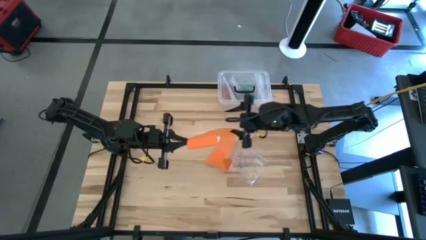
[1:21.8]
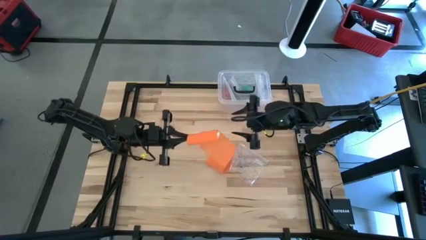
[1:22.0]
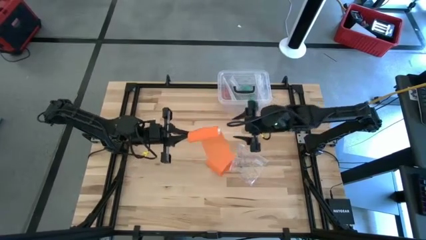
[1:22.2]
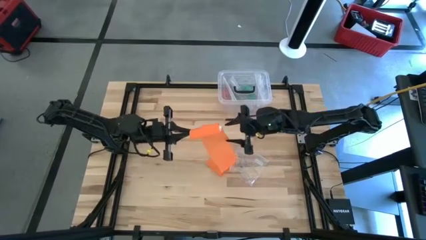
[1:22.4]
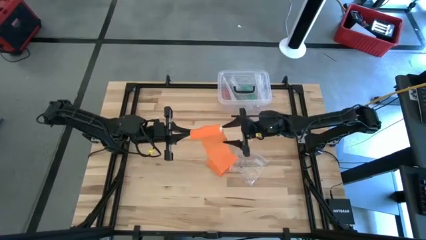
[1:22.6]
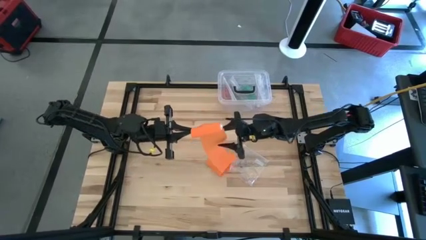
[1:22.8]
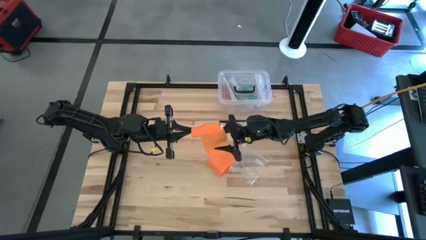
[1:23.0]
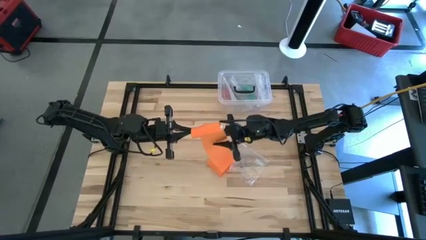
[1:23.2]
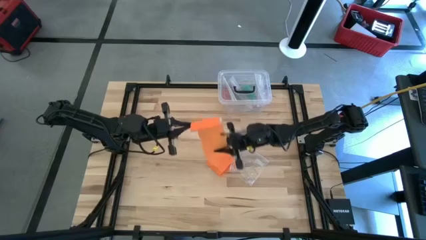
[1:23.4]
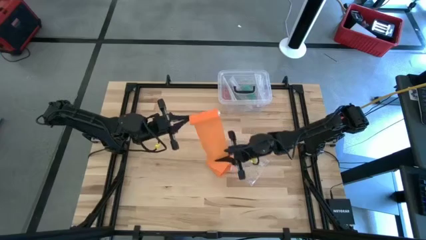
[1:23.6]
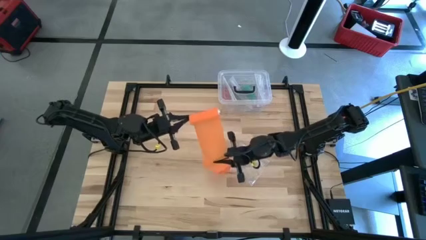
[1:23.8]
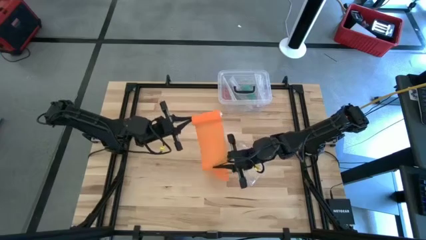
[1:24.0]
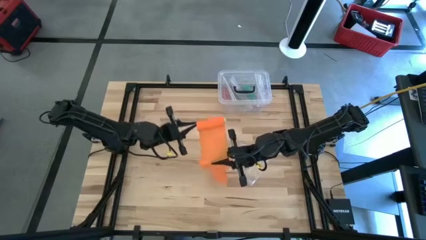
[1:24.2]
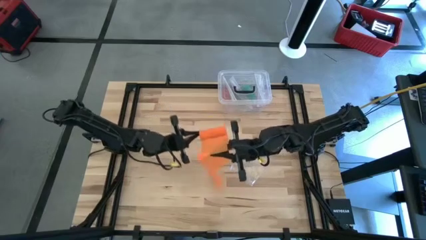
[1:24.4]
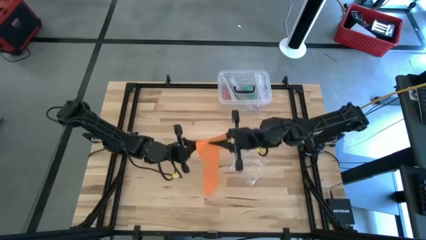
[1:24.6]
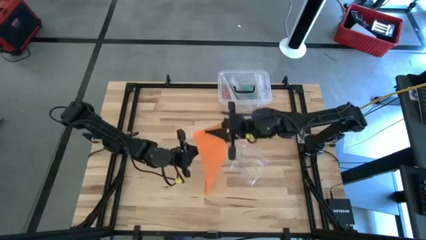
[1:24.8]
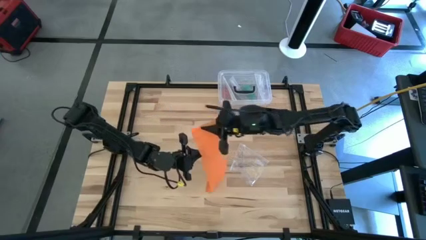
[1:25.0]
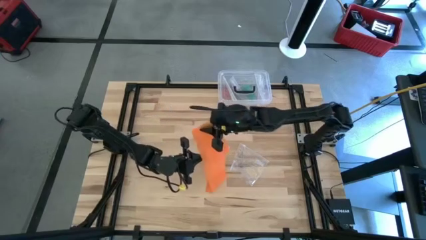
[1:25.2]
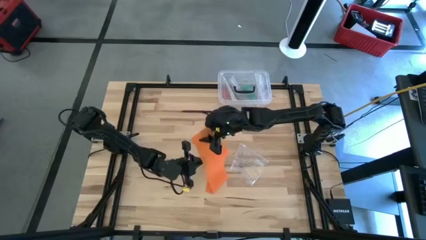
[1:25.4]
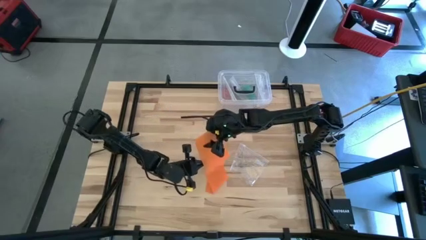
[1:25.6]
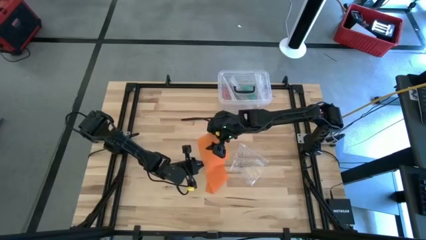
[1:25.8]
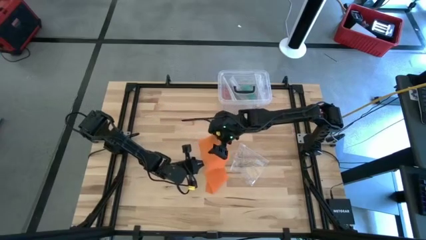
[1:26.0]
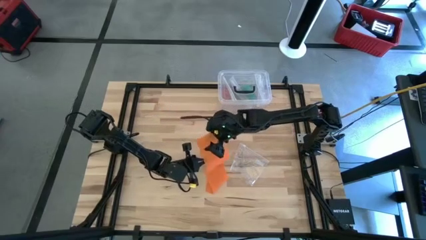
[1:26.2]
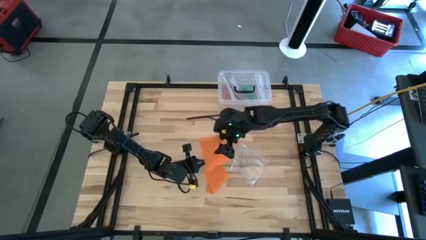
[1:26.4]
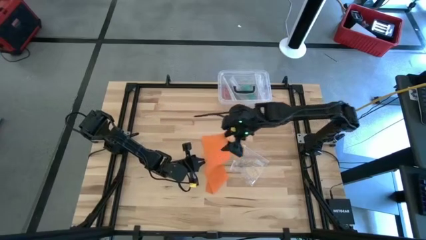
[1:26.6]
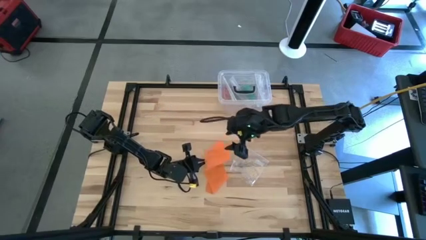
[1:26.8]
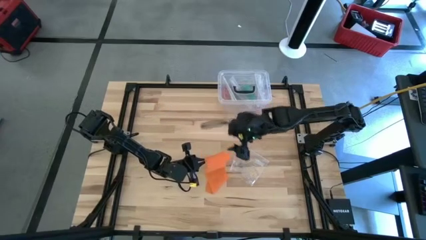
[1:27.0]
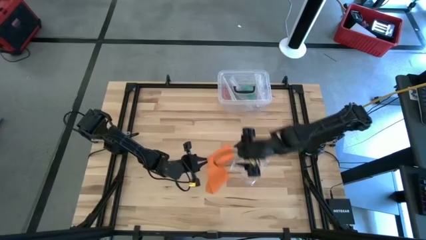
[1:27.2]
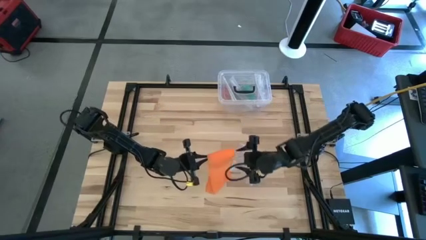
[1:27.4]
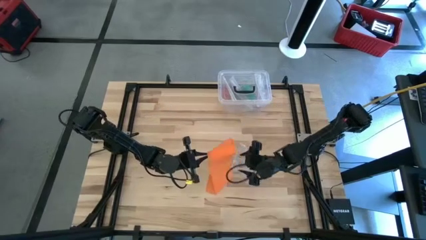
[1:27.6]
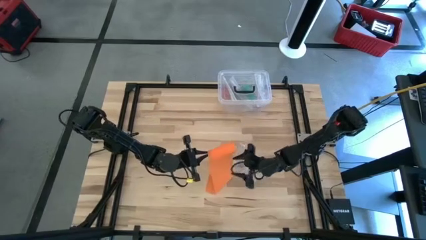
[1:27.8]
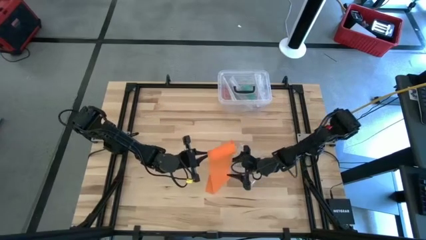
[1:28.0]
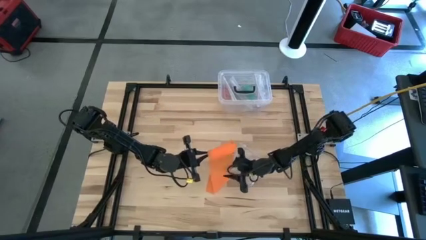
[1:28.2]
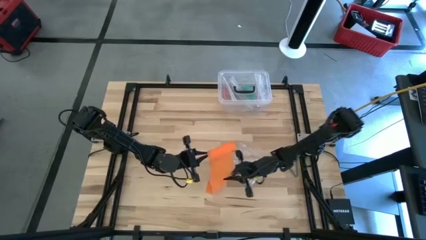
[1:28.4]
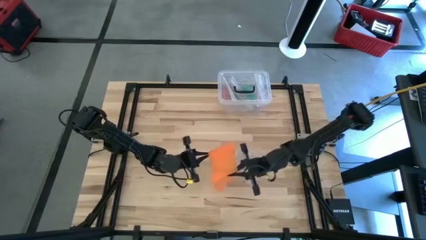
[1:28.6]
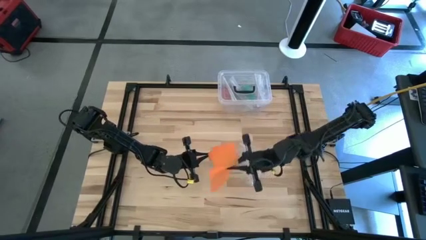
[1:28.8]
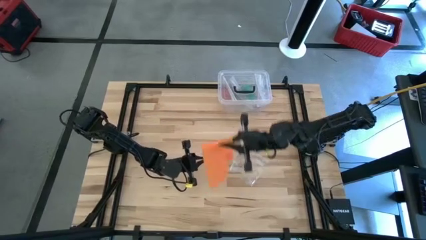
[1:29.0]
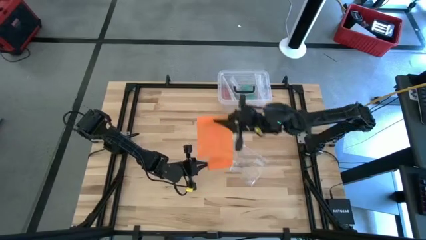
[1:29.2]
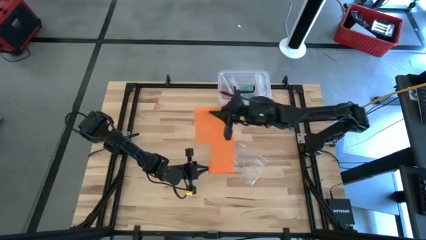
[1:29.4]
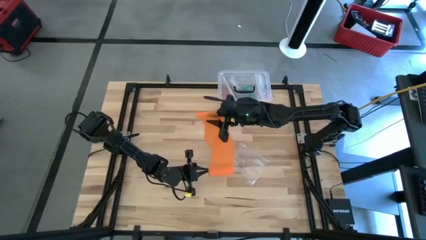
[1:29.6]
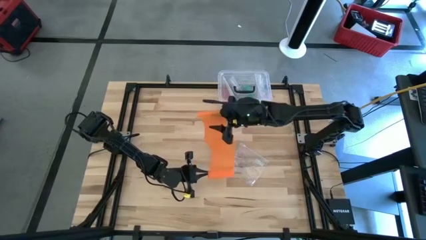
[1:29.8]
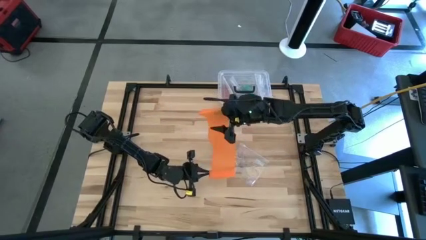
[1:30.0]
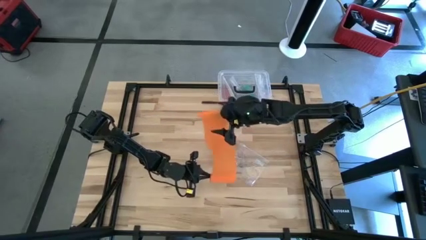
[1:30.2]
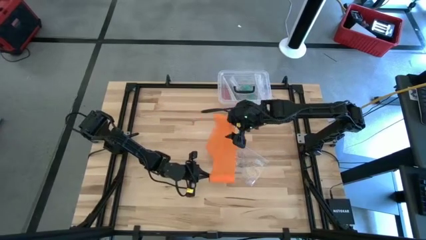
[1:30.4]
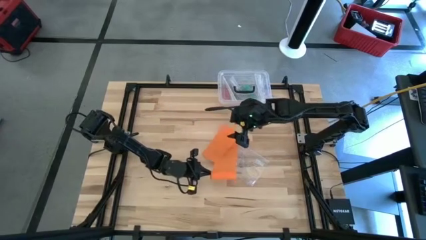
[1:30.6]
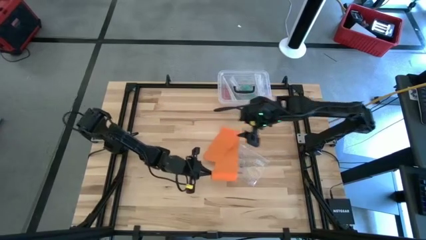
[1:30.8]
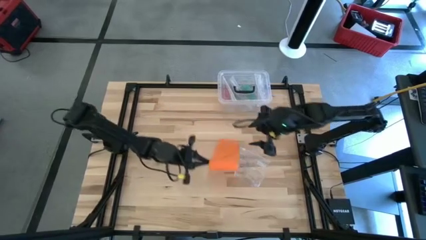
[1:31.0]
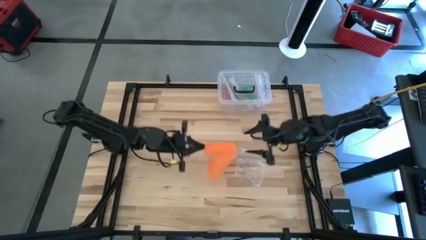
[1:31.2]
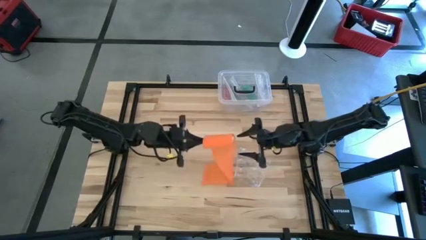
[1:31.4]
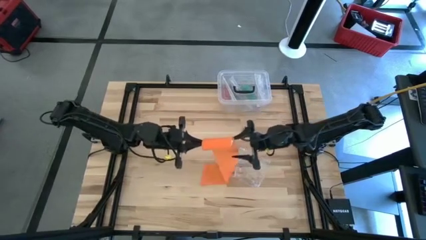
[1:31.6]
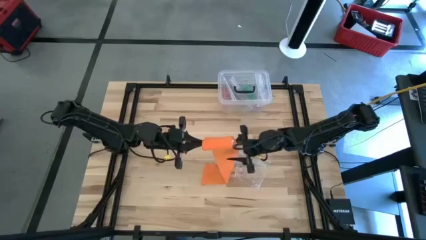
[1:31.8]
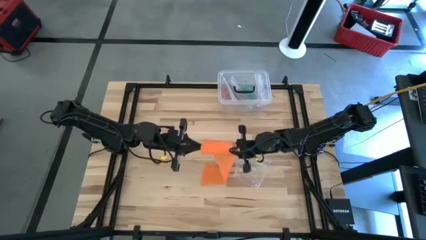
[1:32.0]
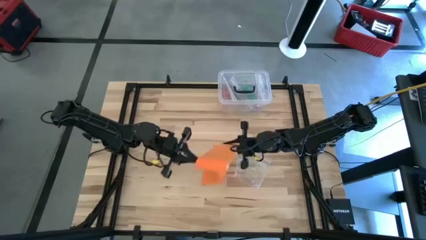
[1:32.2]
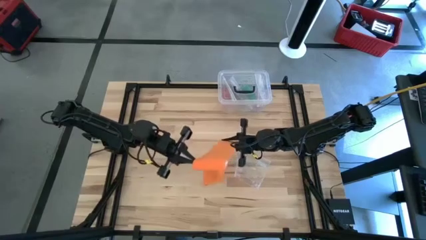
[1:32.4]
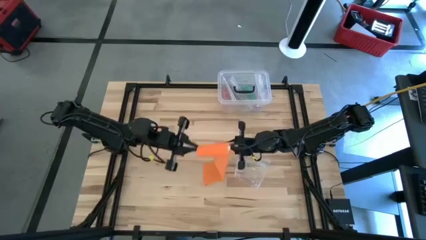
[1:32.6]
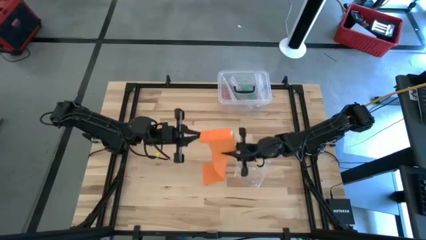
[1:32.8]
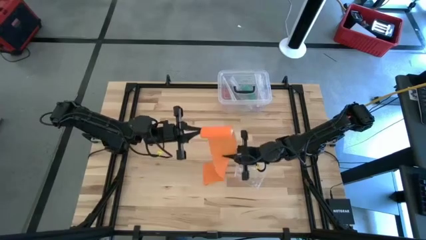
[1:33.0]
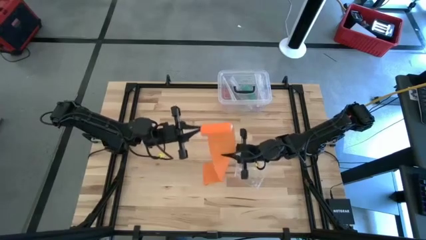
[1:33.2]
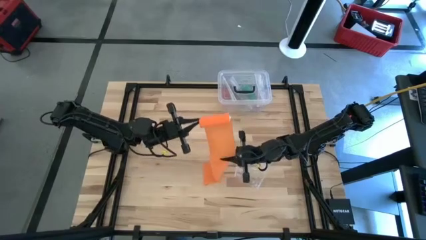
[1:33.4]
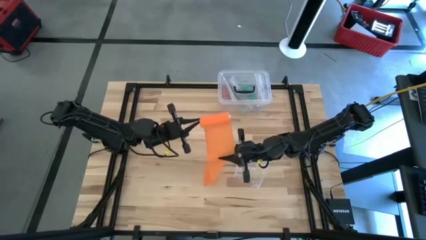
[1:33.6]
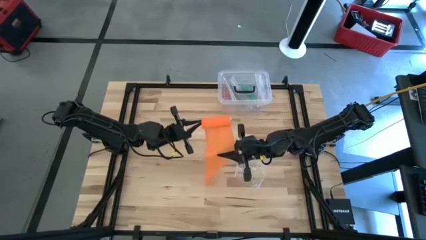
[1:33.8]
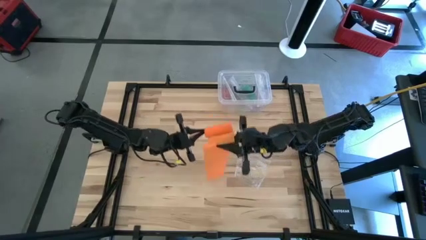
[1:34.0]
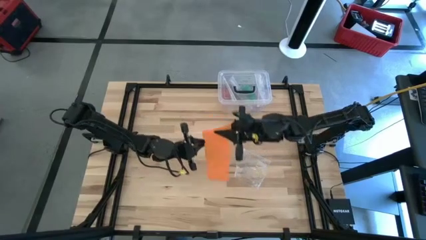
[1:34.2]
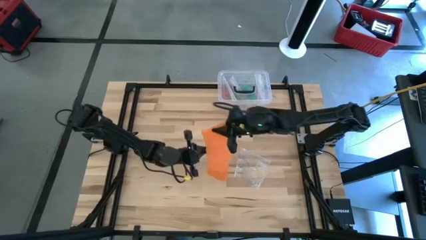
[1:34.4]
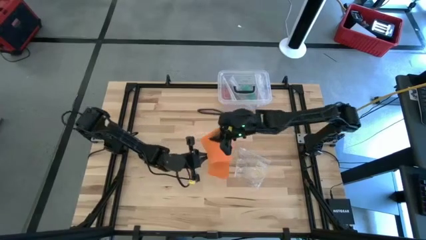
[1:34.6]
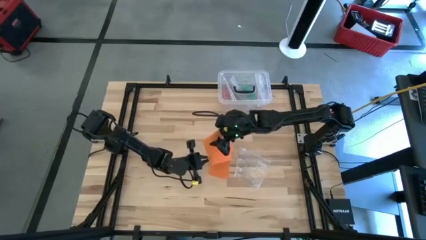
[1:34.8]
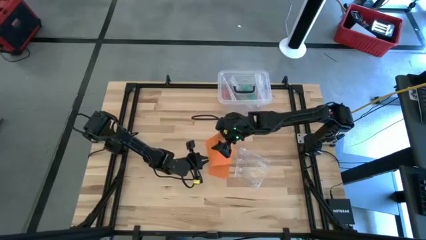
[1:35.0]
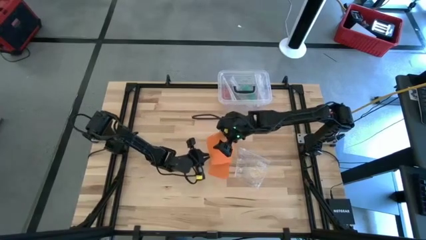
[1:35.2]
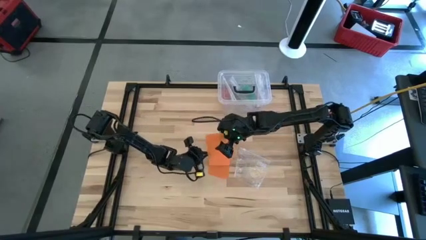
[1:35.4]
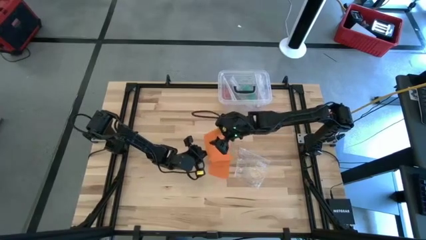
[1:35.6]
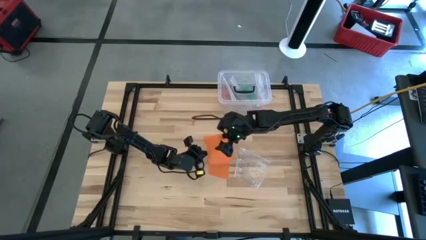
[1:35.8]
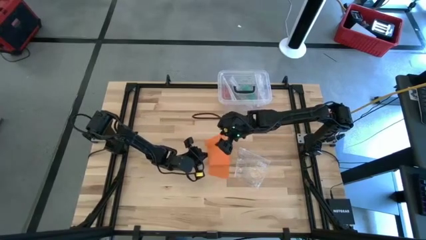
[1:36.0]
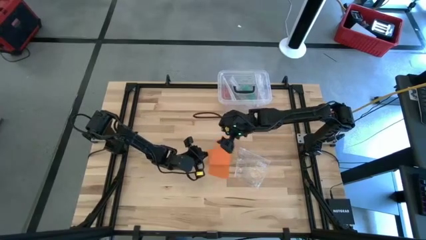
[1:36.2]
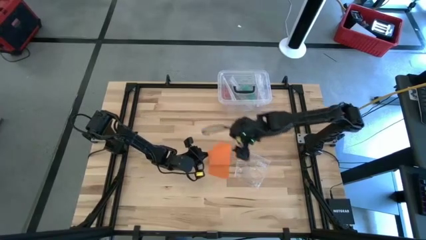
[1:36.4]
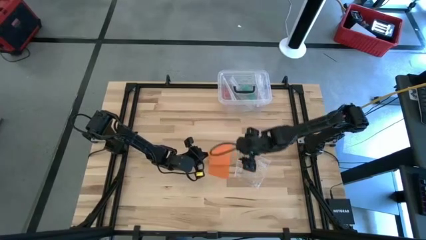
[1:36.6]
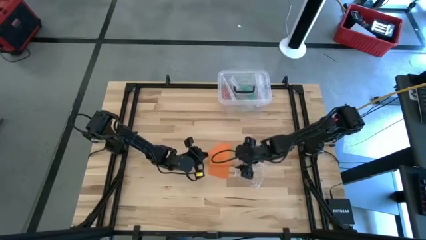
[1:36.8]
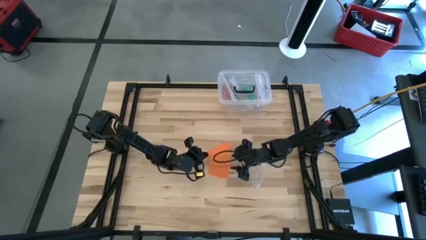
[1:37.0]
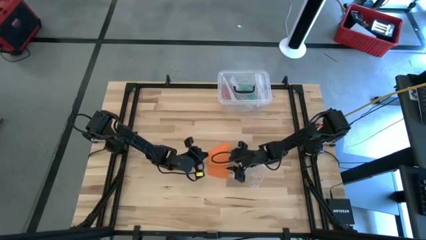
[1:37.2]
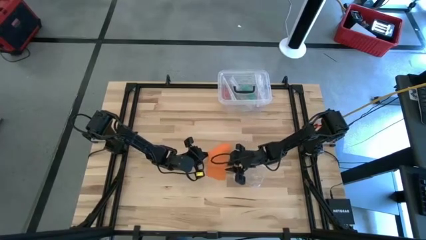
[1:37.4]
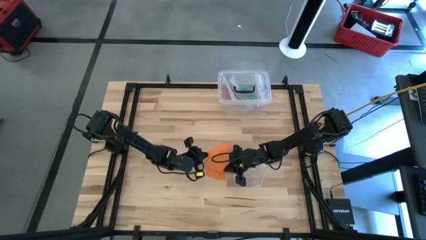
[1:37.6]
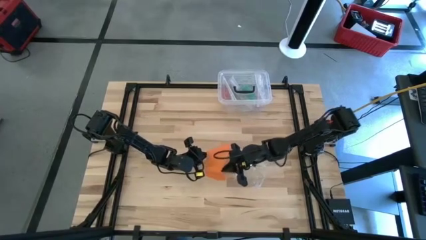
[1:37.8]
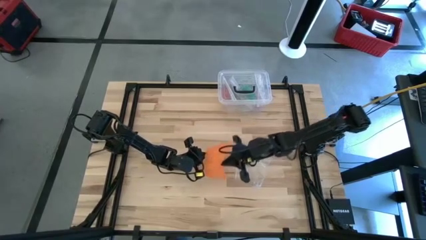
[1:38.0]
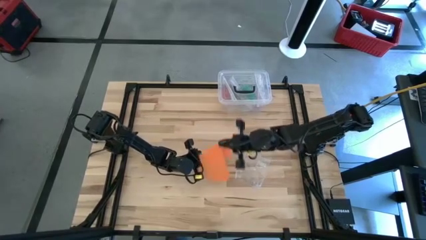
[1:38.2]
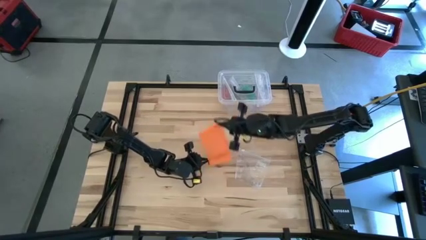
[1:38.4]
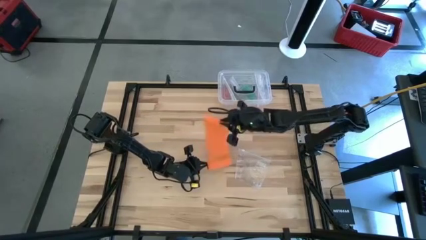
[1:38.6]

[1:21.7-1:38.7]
Task: Roll bandage
Roll the orange bandage
